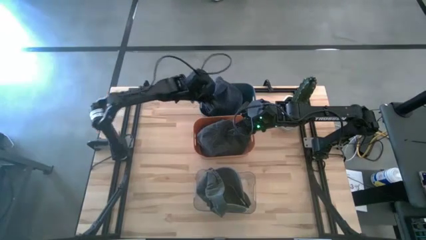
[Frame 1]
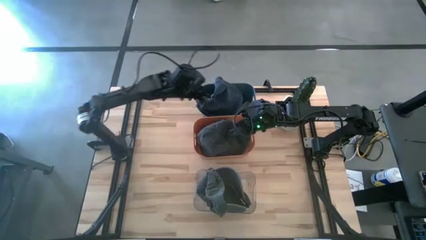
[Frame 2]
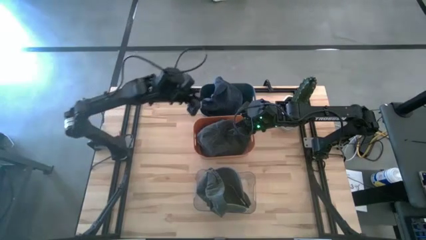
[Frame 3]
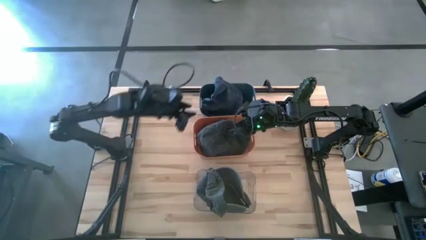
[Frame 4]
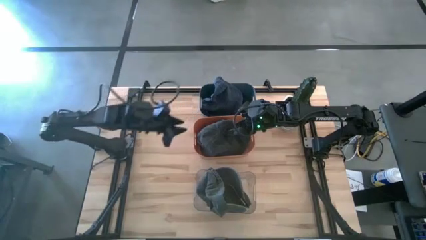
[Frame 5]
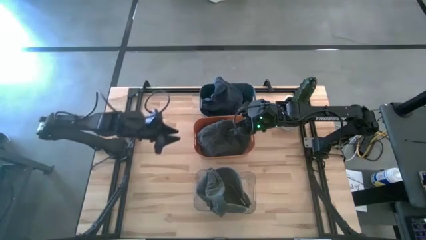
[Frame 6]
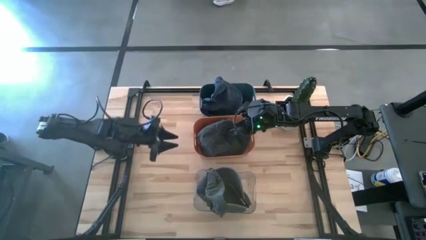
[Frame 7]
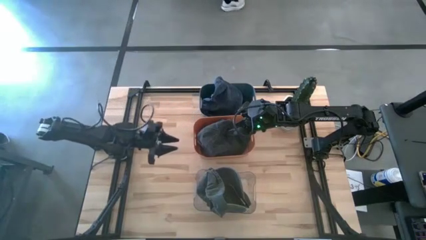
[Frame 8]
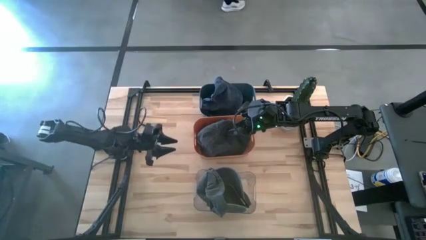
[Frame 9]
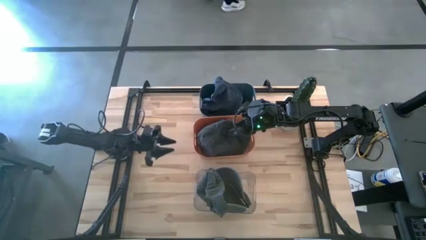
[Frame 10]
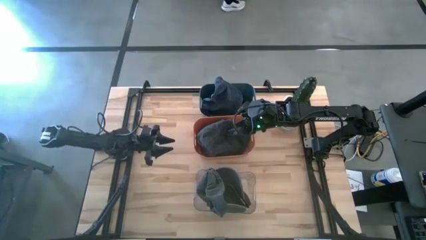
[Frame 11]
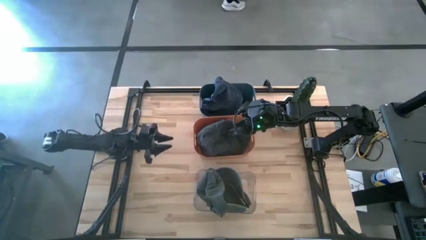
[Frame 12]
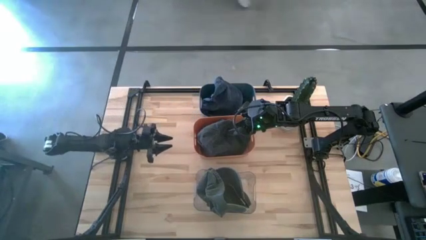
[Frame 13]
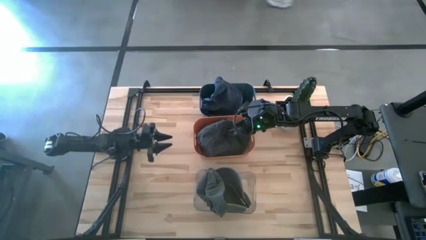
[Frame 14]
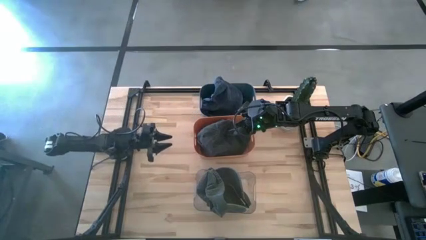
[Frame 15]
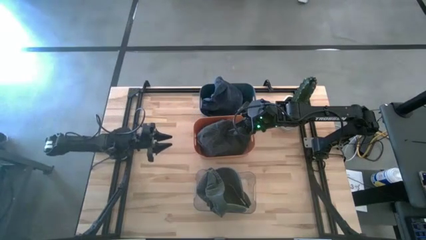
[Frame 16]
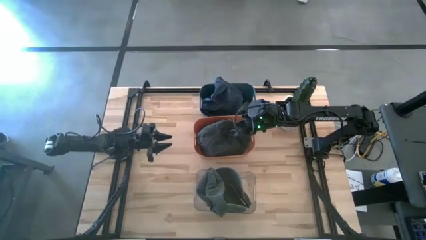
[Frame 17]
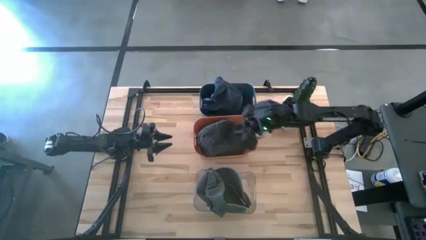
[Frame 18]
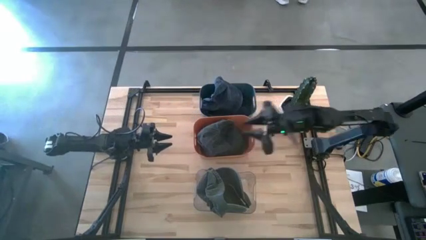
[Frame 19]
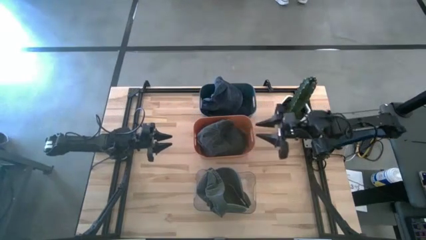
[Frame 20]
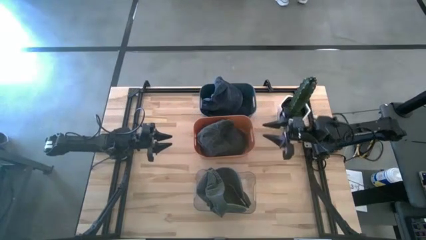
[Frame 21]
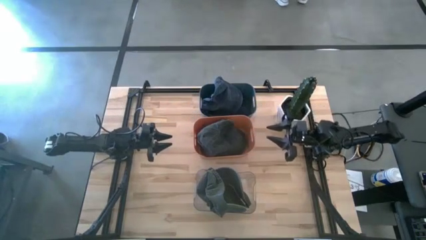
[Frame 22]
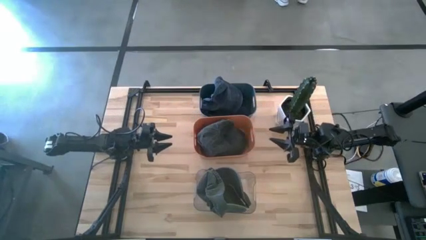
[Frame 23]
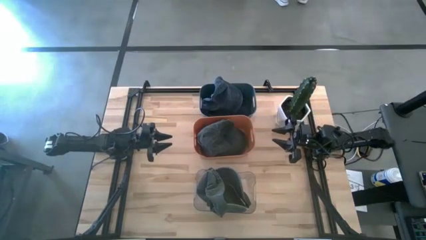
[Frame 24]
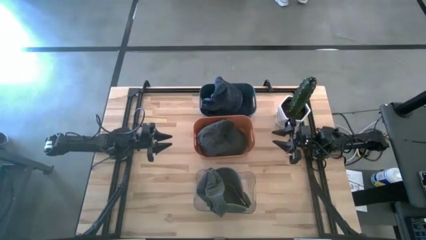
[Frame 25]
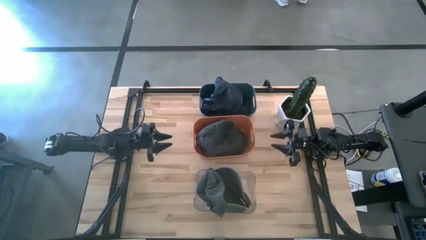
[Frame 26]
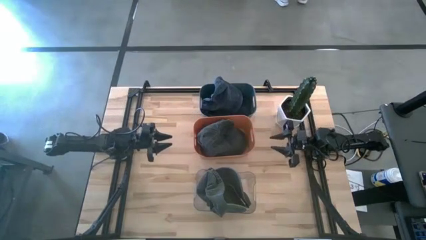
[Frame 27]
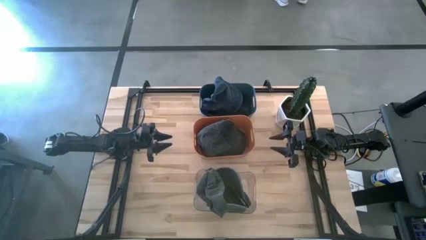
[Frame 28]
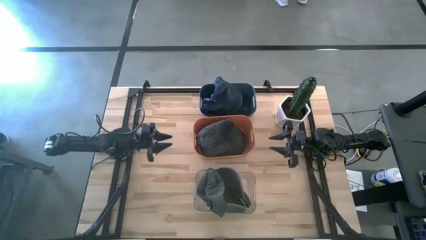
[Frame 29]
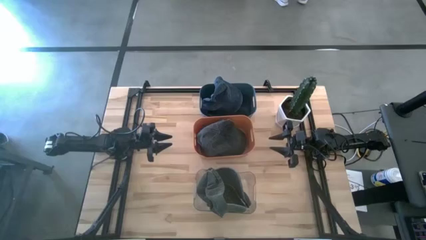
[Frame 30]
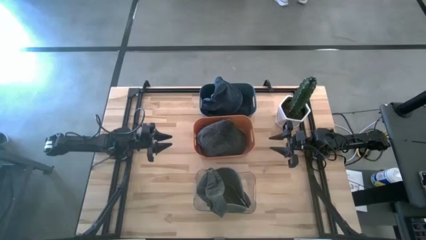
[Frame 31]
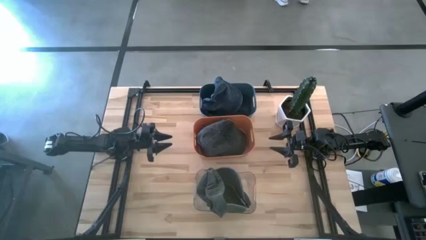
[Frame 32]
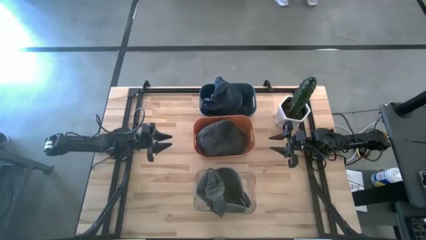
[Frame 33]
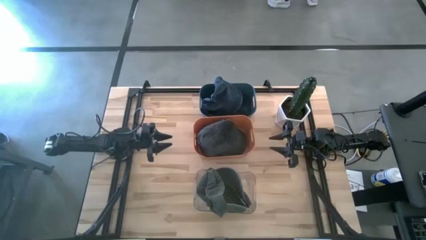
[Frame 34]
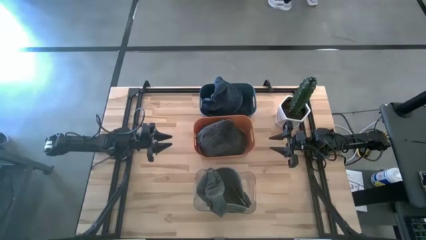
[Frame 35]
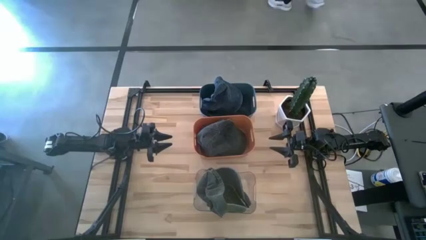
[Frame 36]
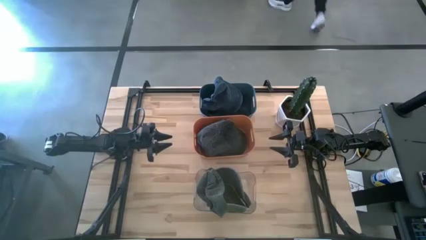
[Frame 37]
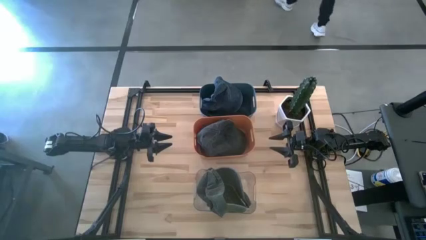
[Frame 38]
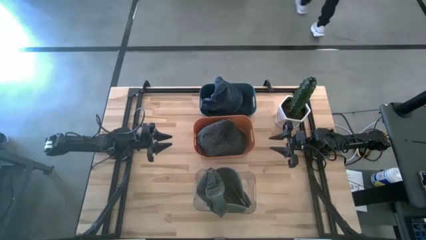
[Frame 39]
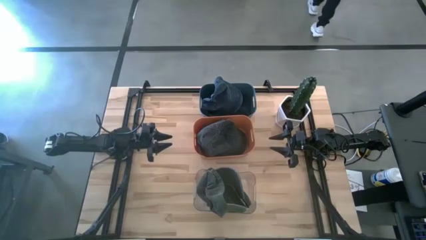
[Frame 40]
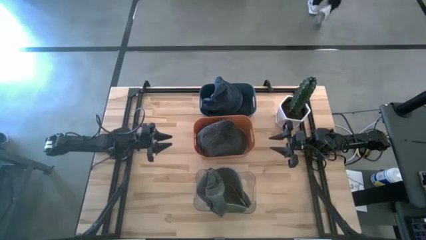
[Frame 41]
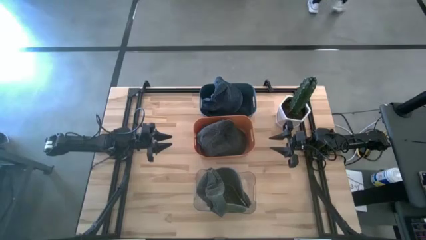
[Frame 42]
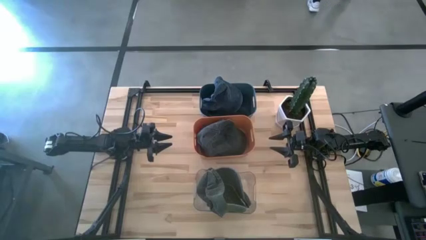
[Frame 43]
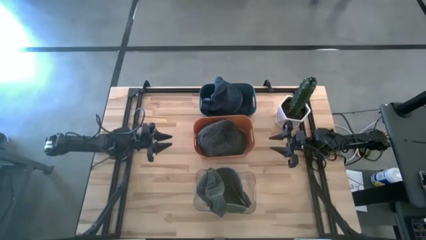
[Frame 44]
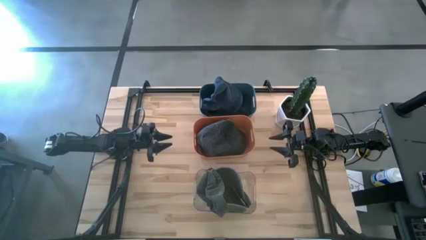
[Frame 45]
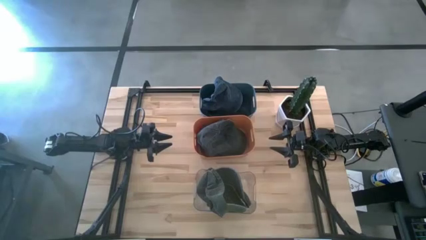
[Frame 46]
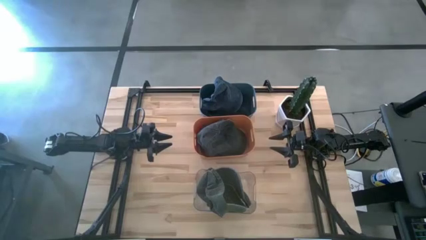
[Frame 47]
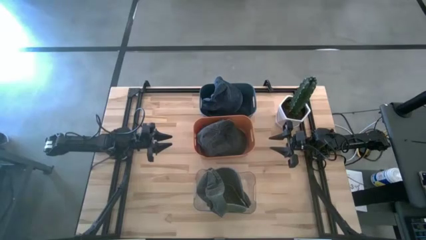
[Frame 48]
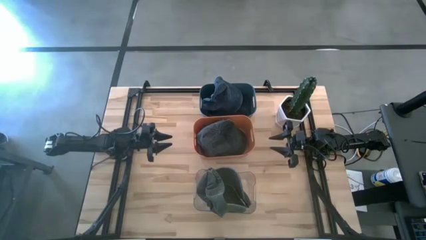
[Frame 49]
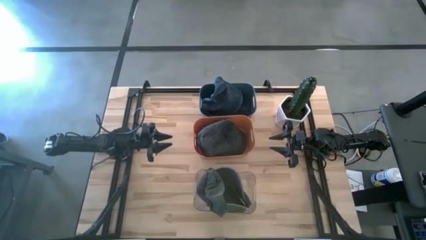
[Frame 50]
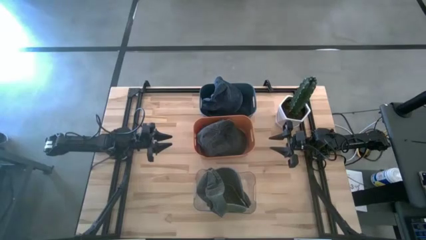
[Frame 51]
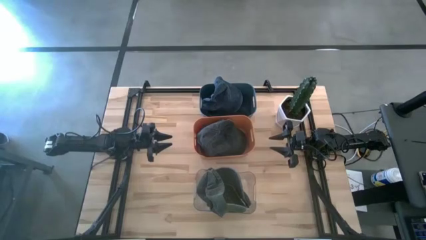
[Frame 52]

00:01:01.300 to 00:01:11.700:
Task: Pick & Place hat
Return to Home Position

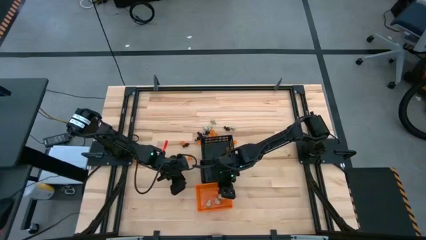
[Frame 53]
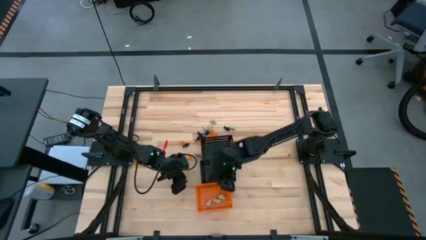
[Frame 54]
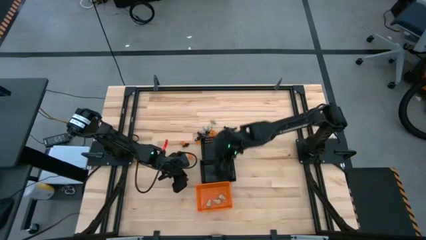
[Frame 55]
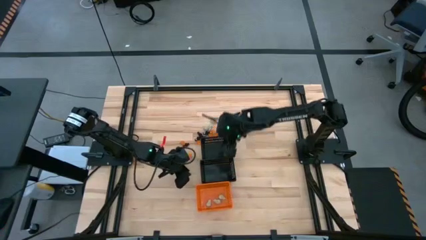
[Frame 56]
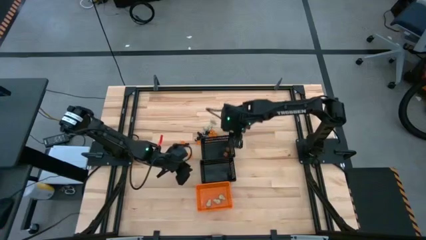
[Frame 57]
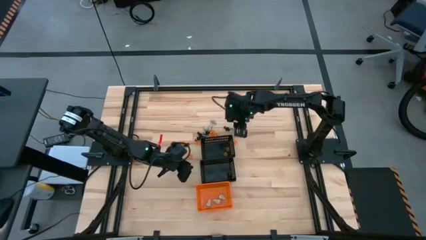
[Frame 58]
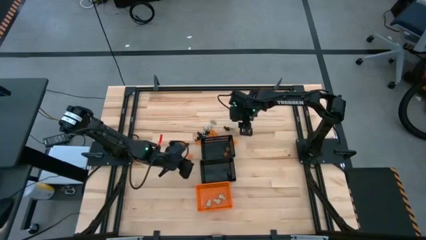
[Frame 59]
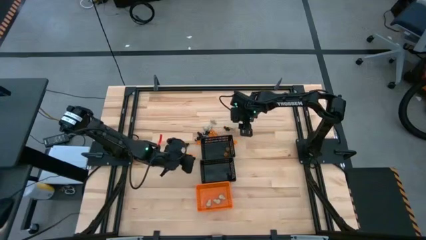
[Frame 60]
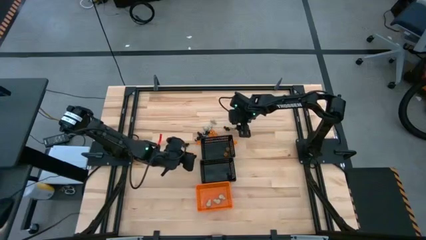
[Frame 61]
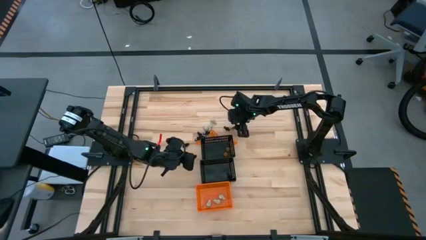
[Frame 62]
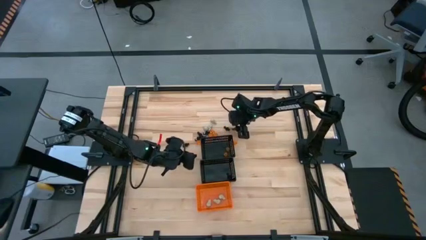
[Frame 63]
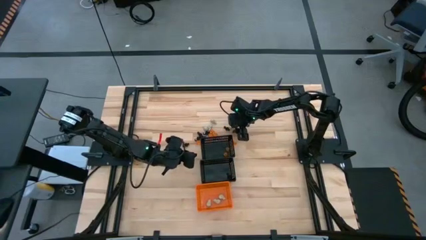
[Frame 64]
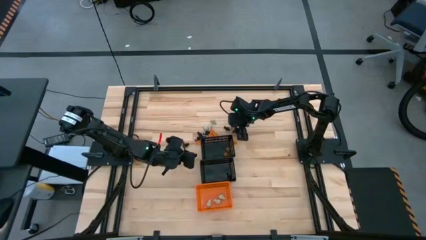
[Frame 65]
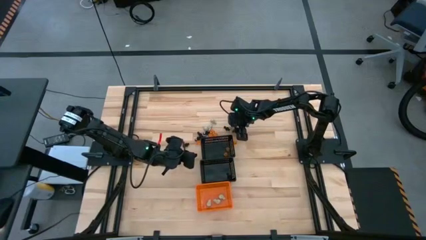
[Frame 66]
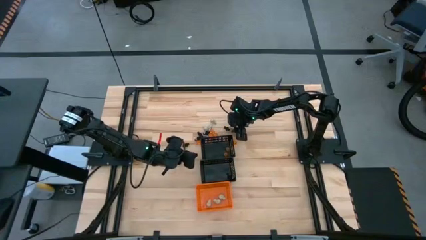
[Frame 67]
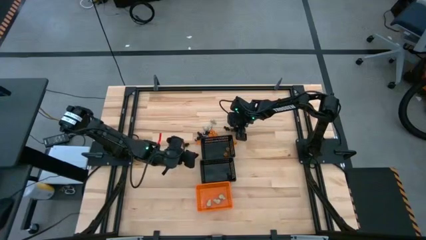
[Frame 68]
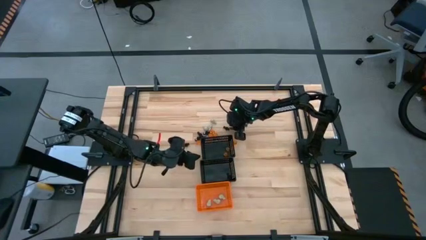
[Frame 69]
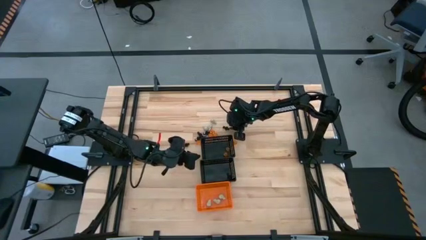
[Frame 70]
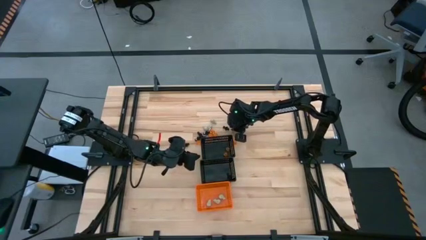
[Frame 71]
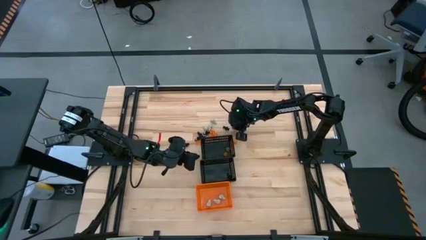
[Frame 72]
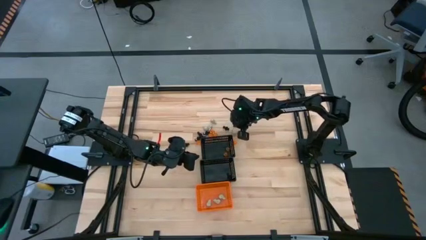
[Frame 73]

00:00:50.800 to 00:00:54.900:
Task: Sort Halloween decoration
Put the white skull toy into the orange bin

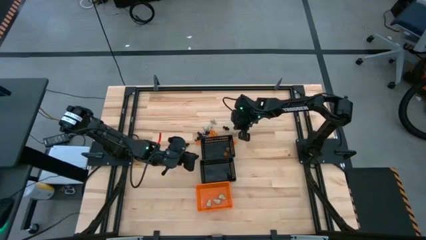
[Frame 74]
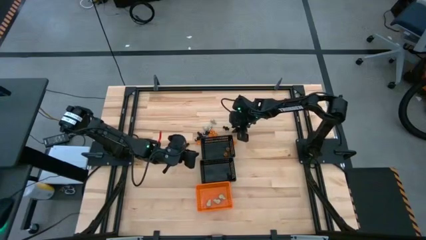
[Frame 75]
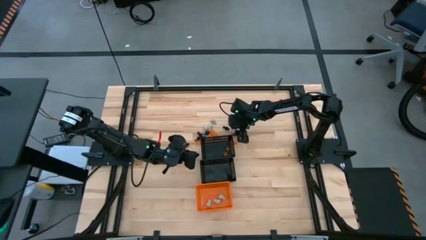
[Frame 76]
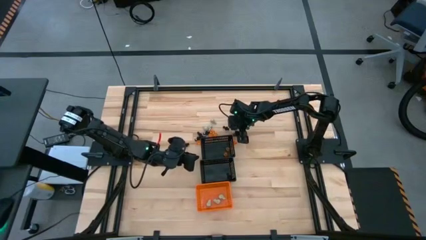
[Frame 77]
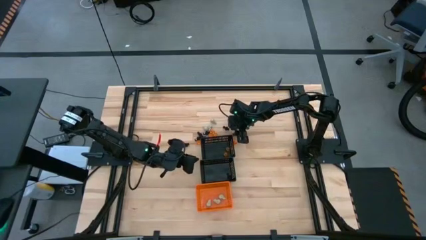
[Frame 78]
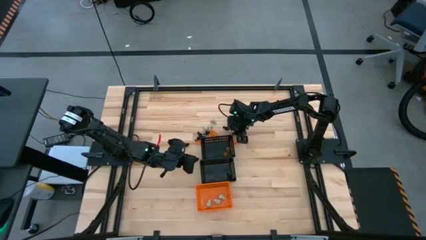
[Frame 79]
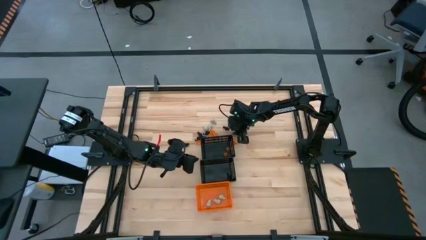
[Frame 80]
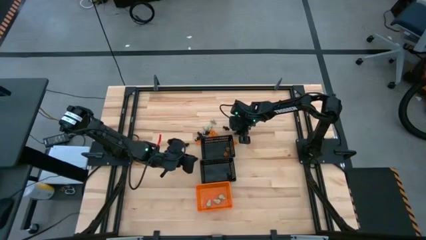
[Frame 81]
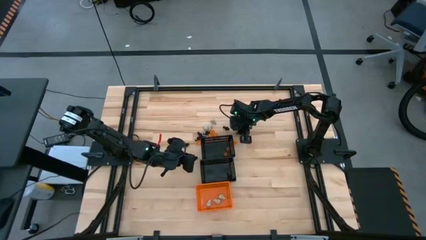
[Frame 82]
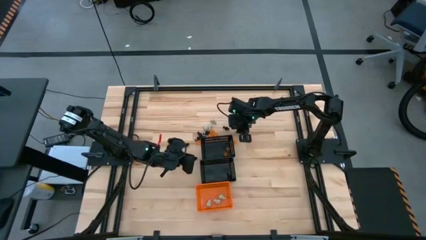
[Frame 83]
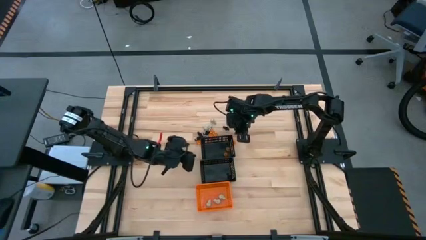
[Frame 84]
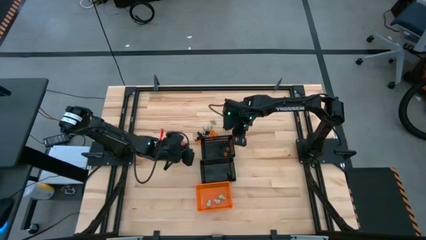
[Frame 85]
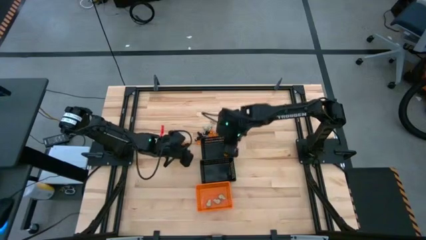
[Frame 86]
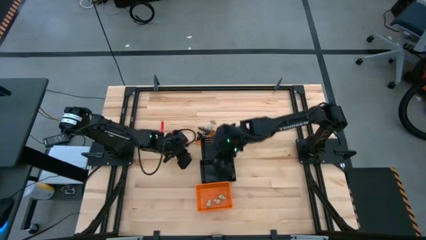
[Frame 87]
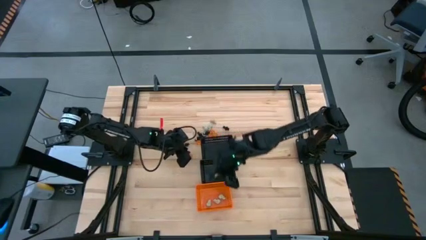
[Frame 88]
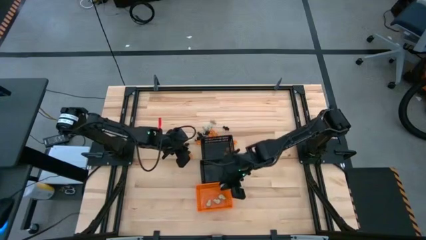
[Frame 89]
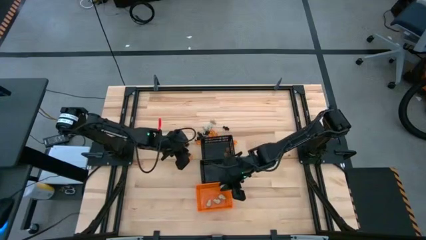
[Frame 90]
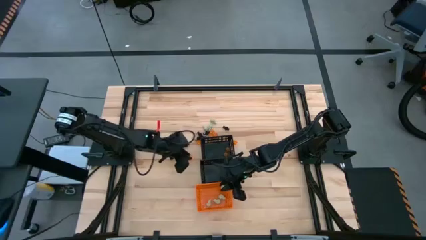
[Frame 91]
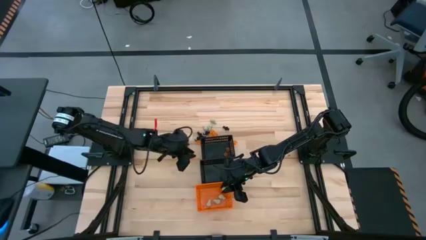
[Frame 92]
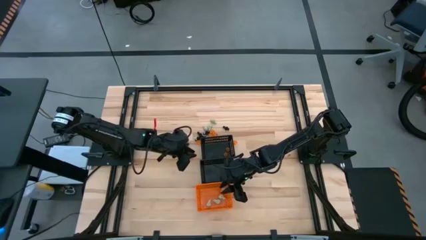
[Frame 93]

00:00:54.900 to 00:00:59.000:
Put the white skull toy into the orange bin
